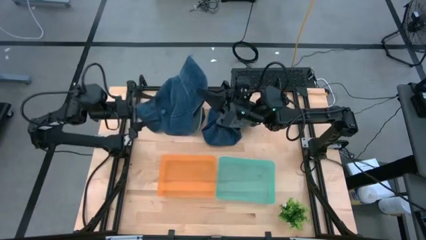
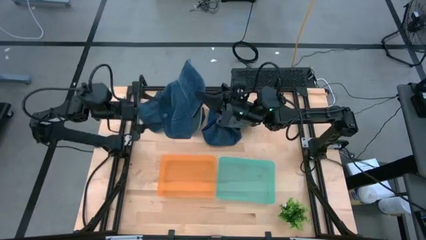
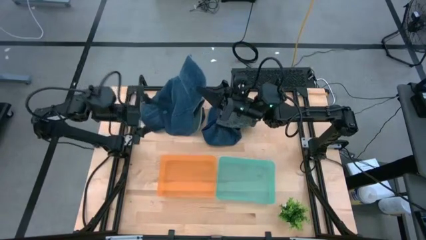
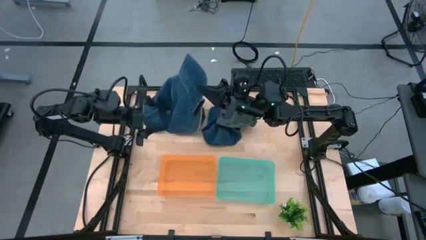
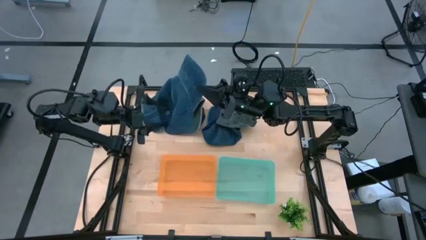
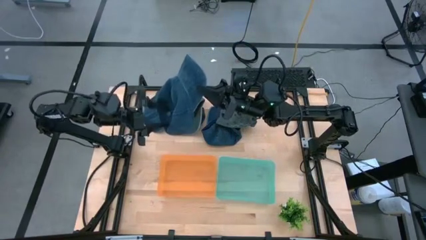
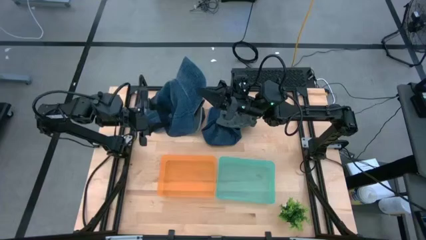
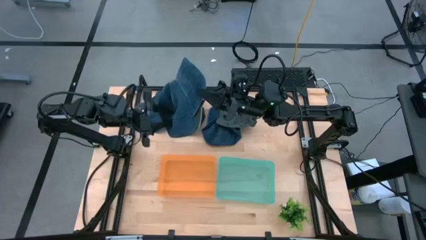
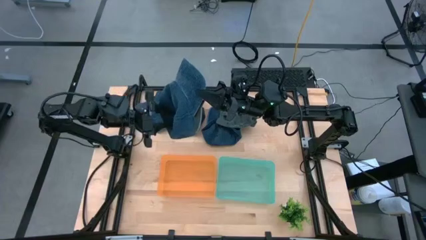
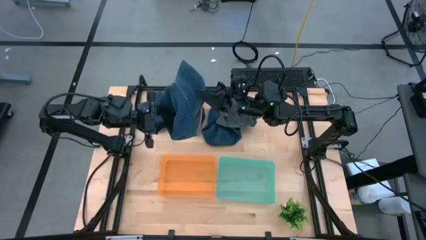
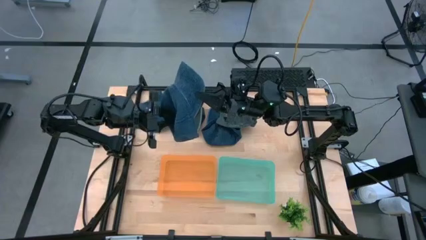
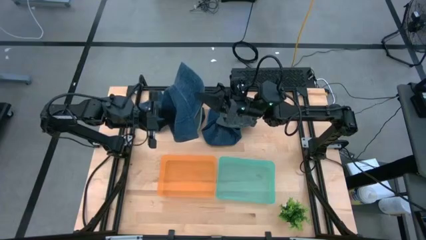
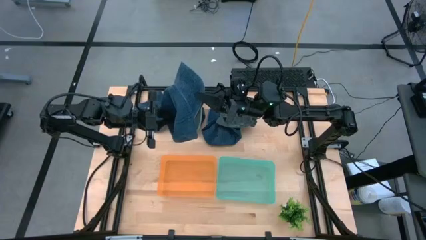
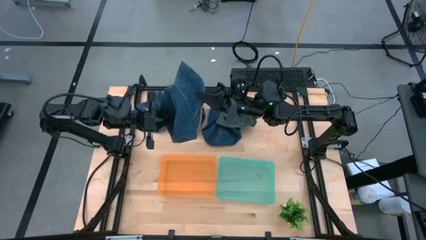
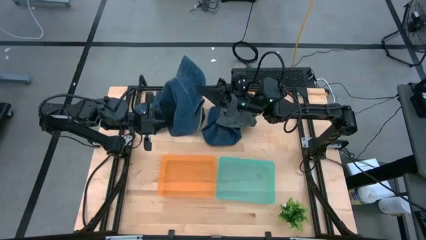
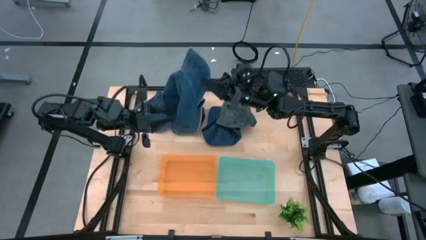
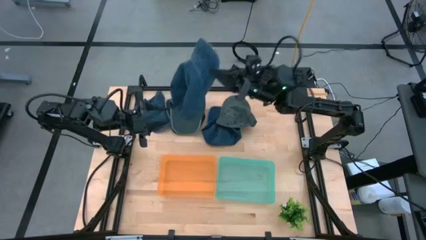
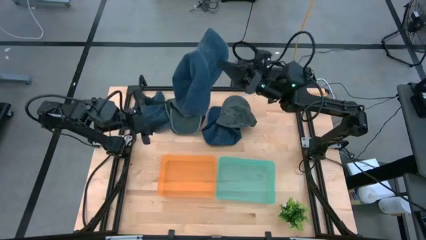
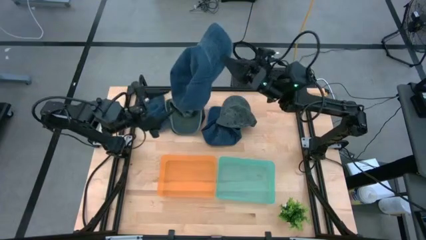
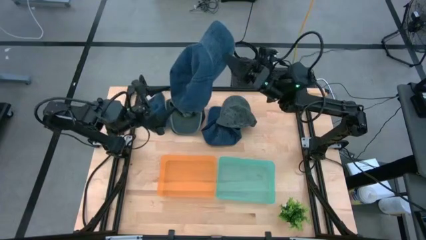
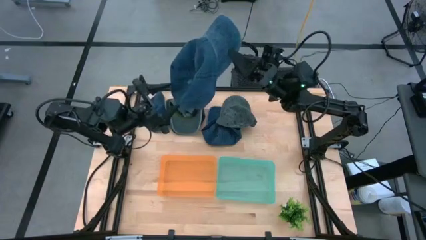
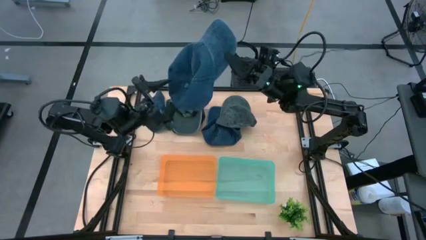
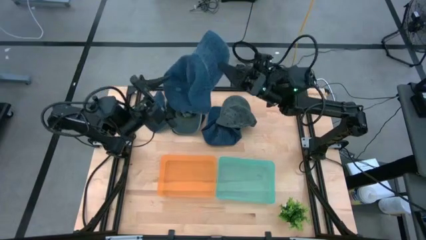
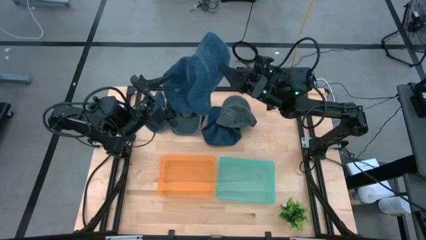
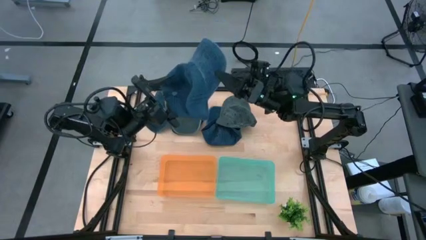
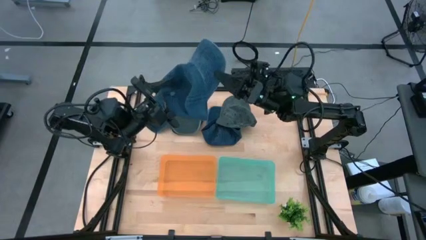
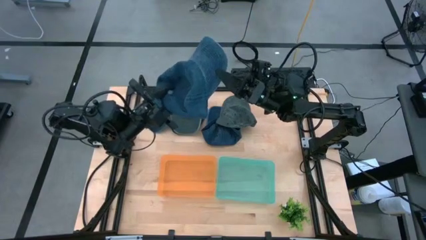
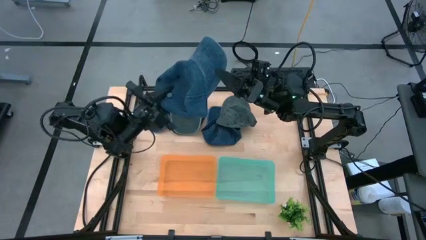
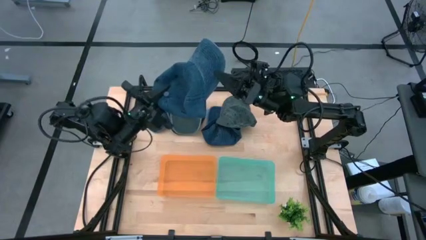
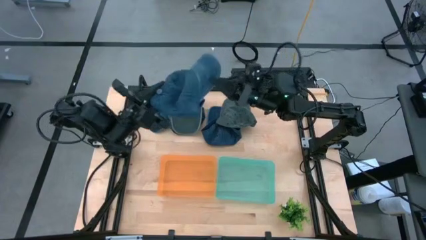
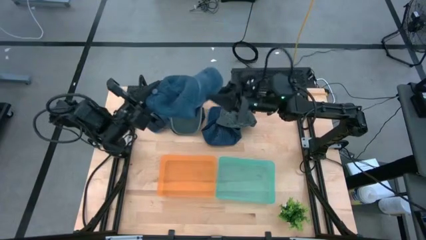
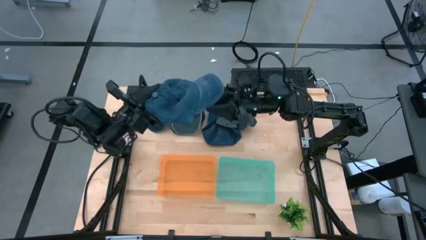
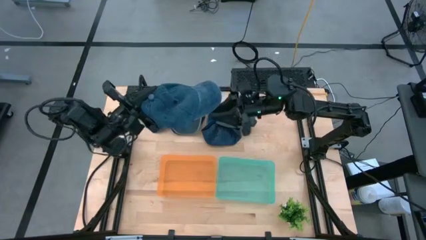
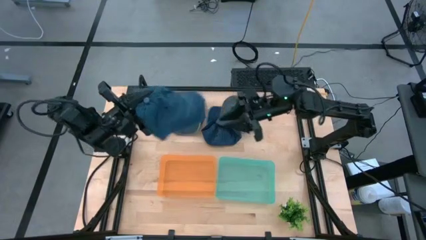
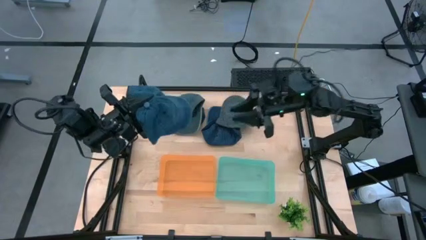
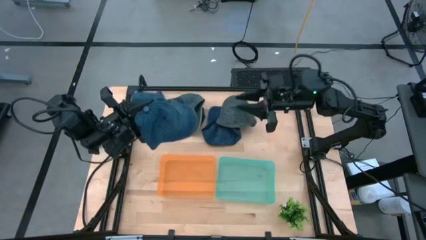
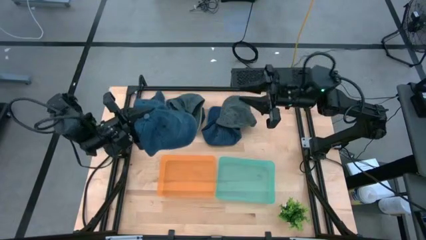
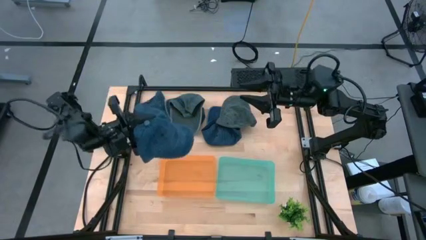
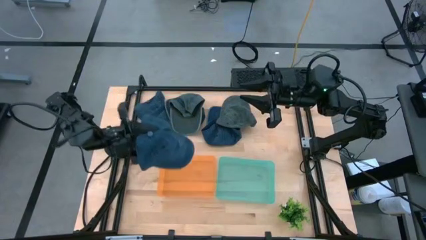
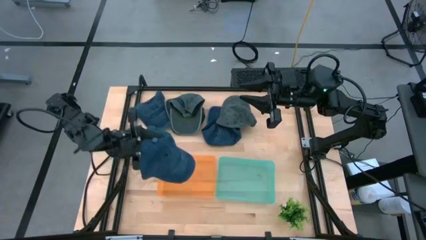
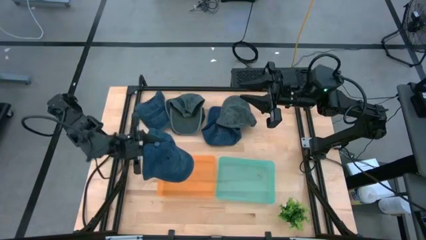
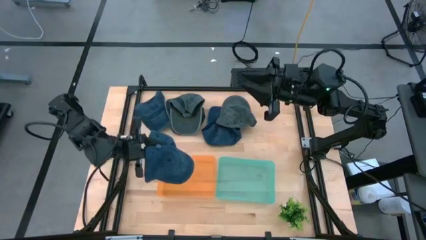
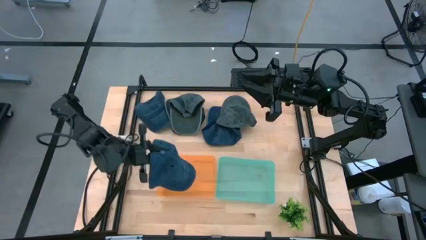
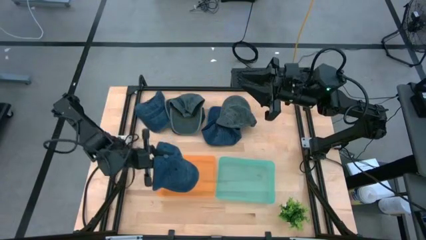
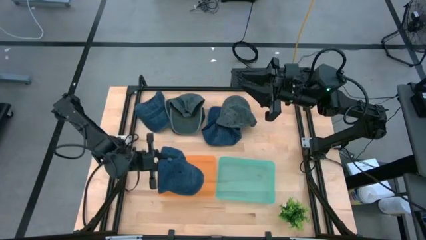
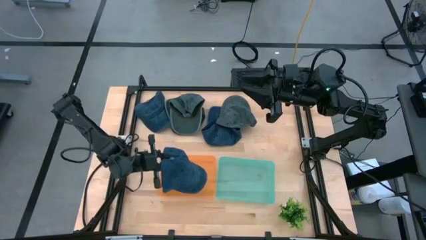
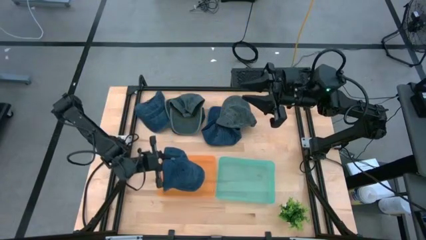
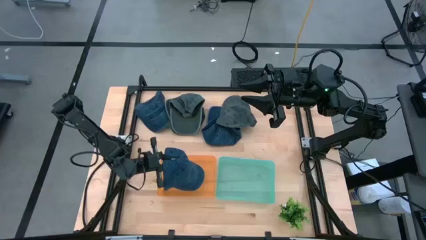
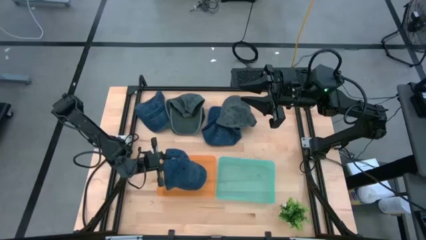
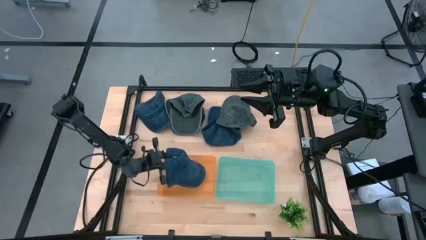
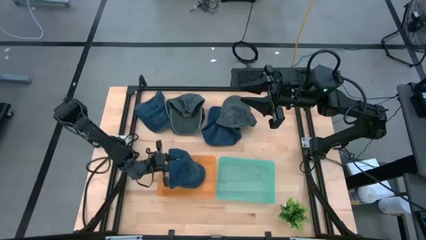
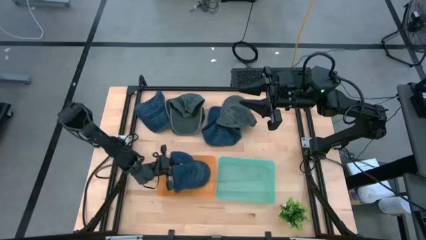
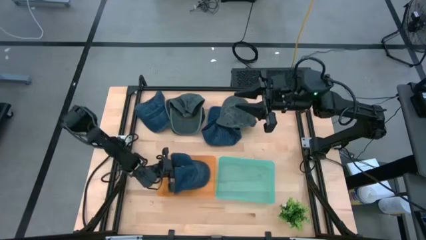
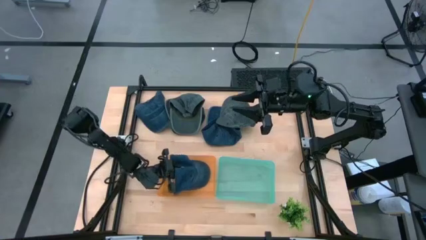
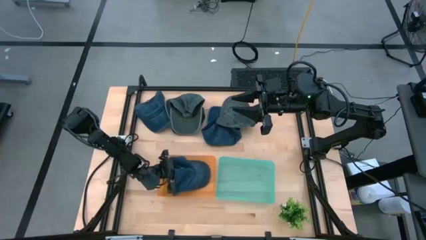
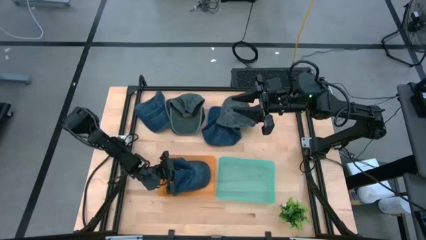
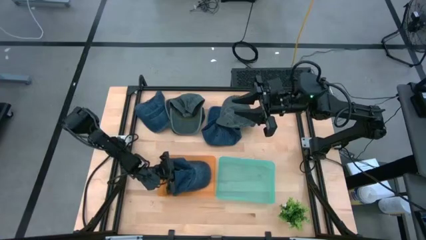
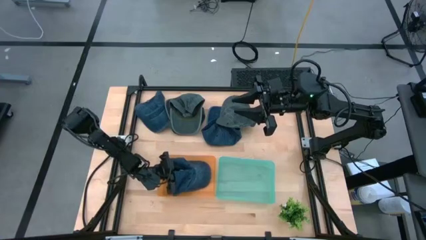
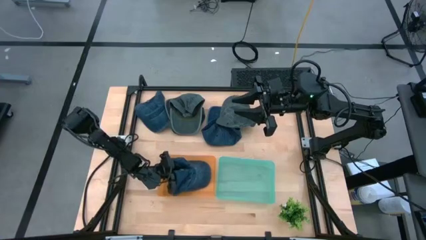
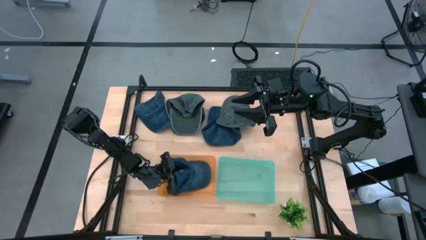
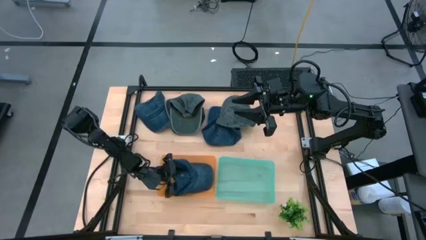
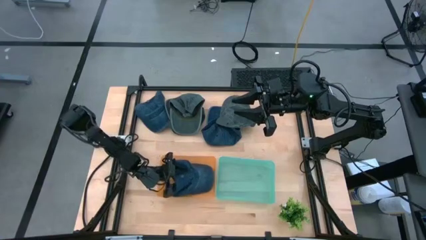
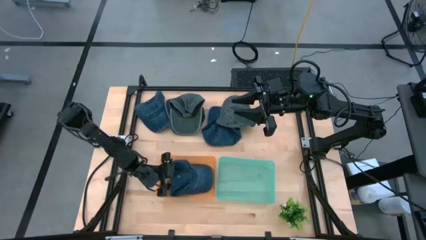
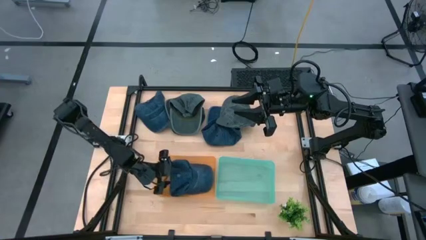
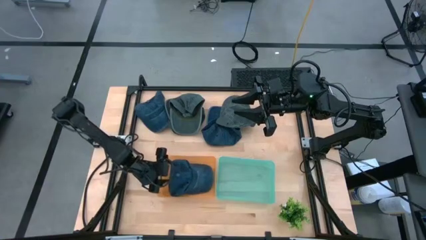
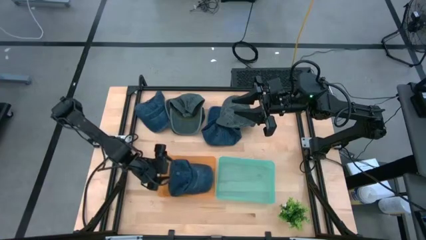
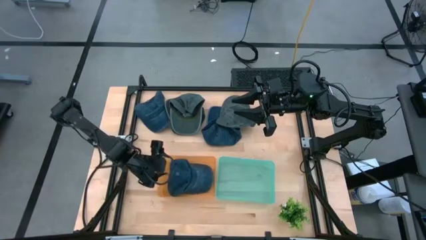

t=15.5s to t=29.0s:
Task: Pick & Place hat
Put the right blue cap into the orange bin
